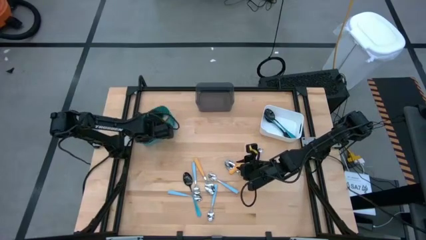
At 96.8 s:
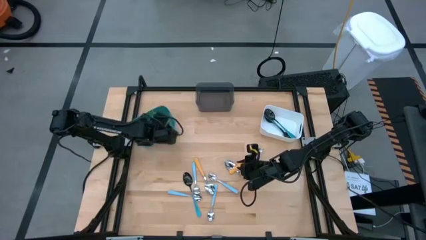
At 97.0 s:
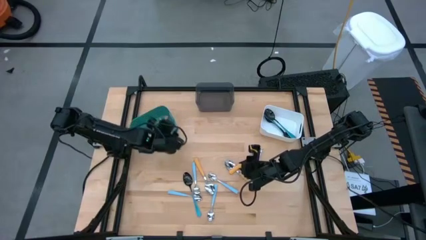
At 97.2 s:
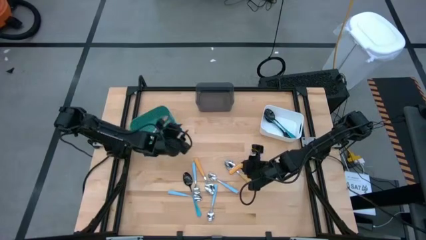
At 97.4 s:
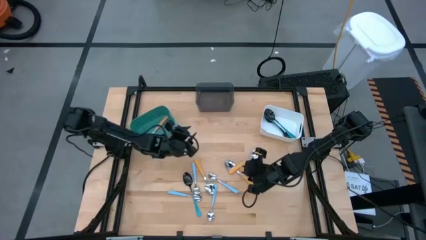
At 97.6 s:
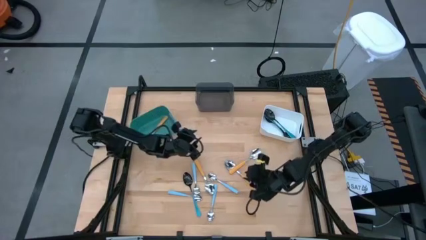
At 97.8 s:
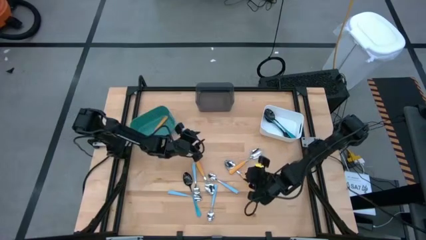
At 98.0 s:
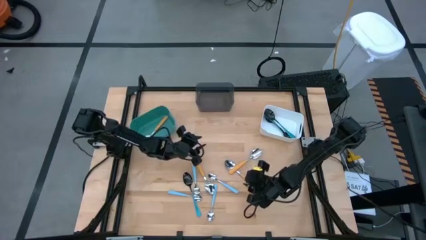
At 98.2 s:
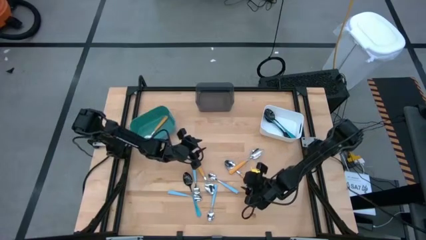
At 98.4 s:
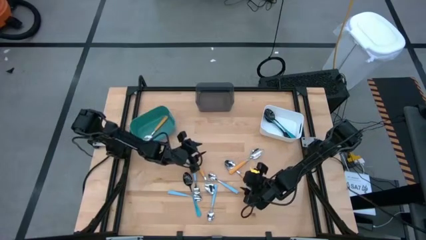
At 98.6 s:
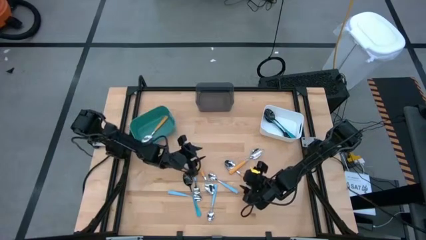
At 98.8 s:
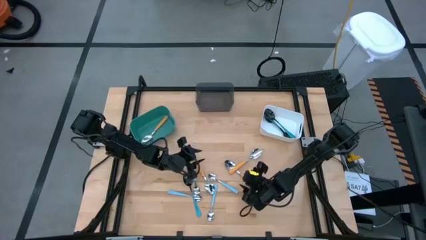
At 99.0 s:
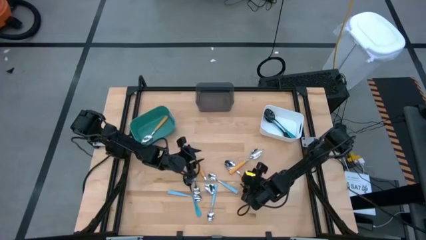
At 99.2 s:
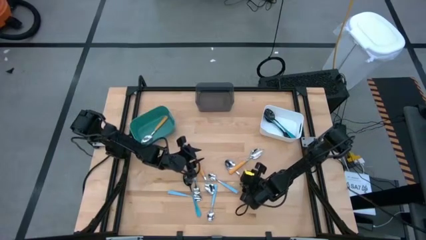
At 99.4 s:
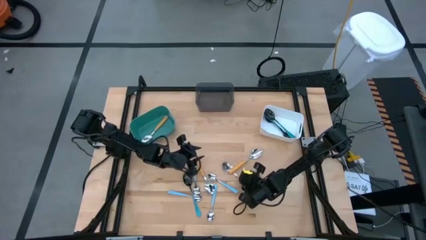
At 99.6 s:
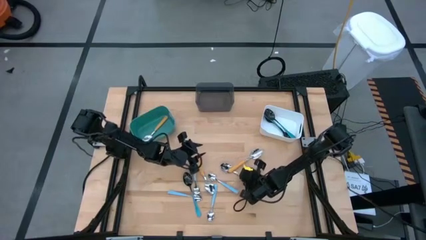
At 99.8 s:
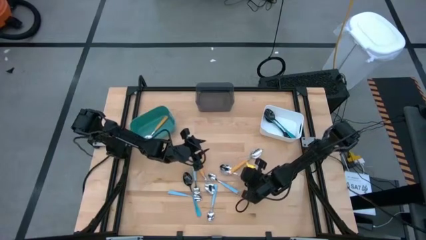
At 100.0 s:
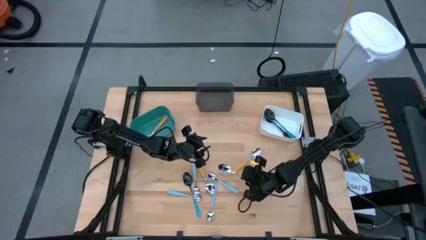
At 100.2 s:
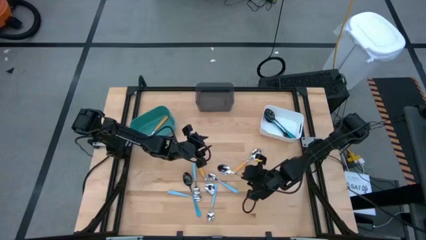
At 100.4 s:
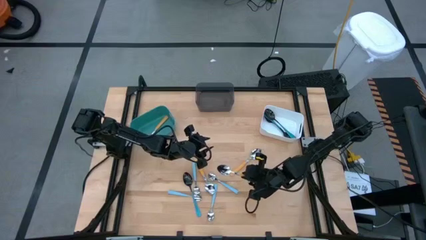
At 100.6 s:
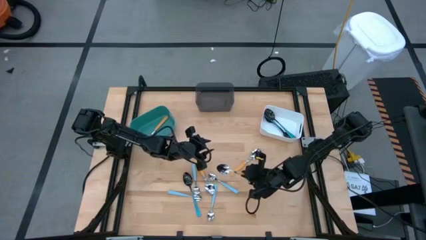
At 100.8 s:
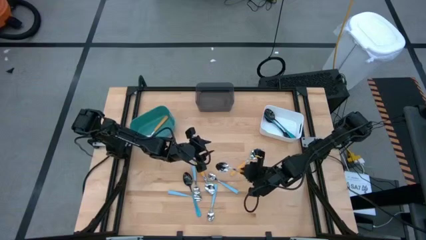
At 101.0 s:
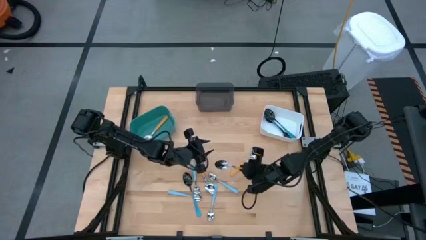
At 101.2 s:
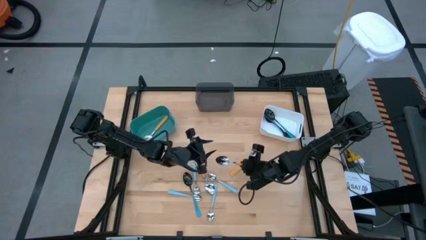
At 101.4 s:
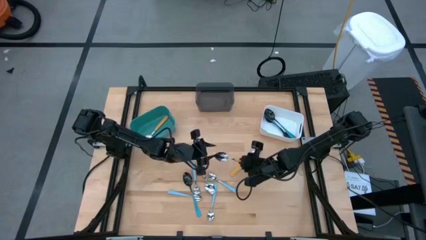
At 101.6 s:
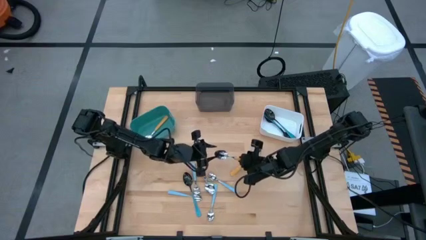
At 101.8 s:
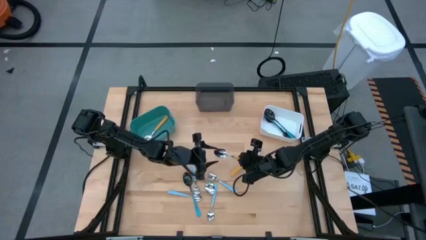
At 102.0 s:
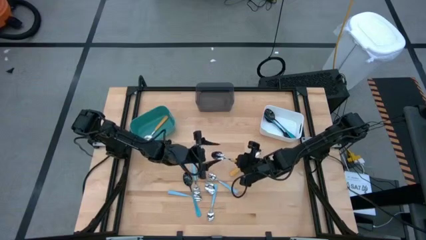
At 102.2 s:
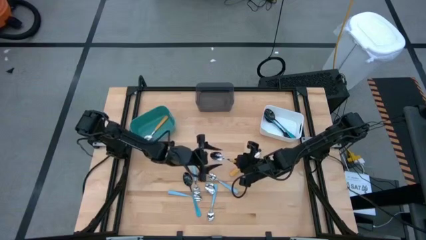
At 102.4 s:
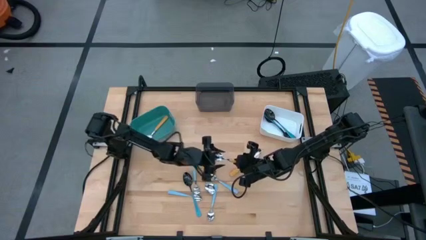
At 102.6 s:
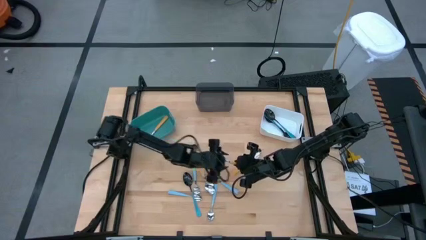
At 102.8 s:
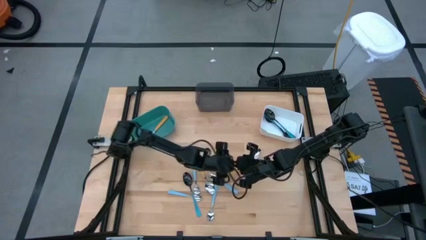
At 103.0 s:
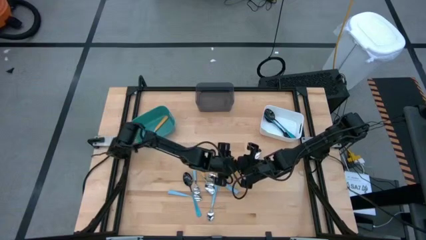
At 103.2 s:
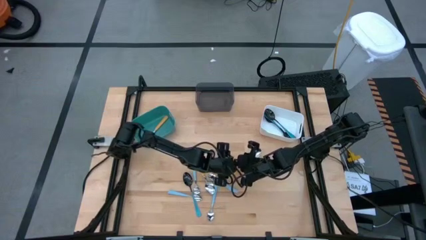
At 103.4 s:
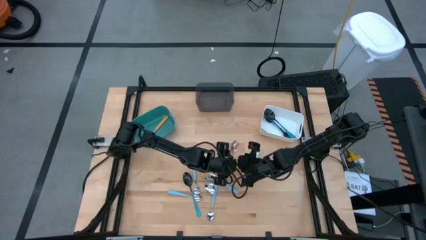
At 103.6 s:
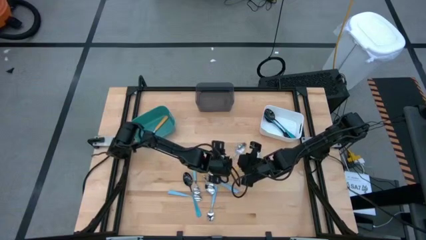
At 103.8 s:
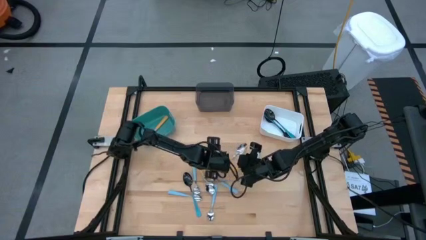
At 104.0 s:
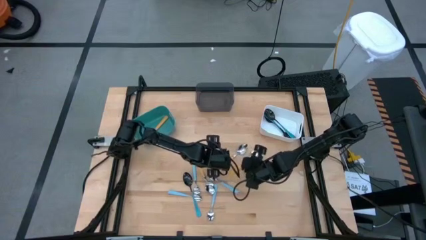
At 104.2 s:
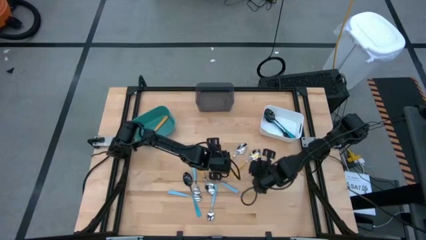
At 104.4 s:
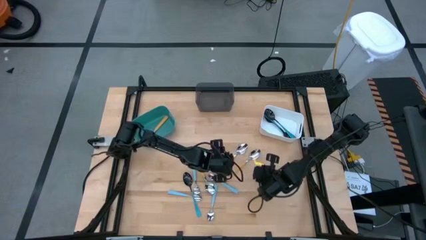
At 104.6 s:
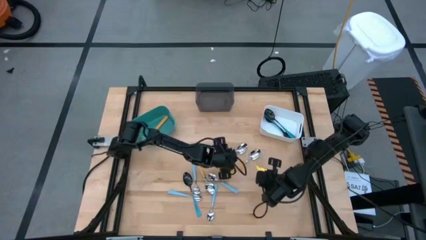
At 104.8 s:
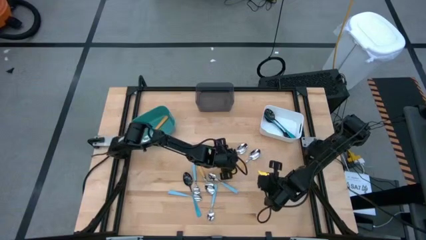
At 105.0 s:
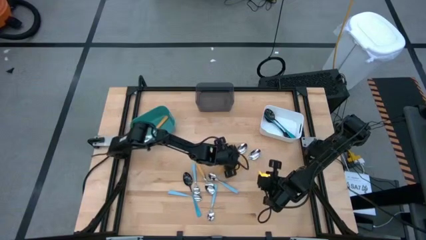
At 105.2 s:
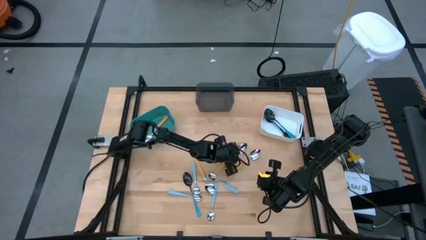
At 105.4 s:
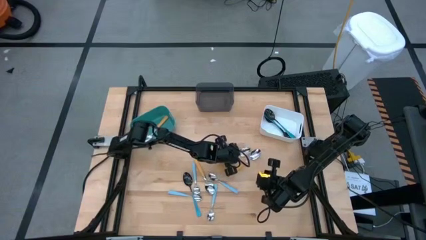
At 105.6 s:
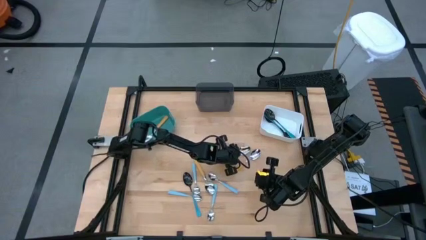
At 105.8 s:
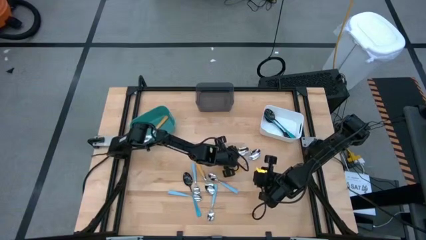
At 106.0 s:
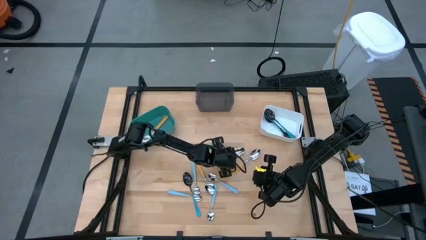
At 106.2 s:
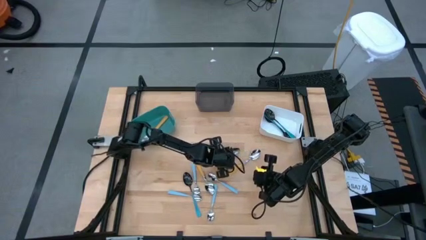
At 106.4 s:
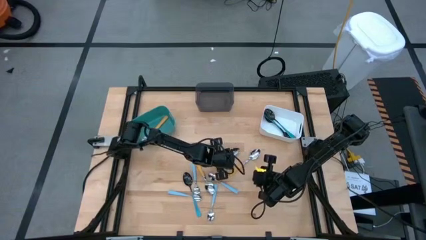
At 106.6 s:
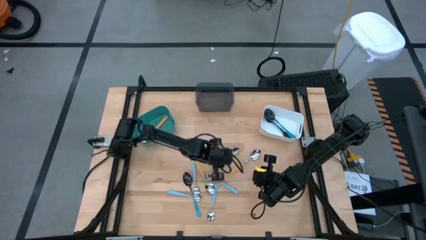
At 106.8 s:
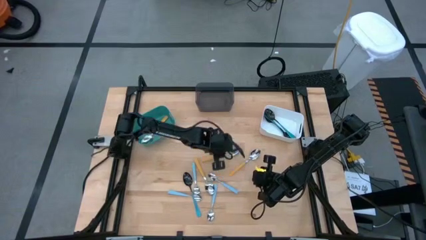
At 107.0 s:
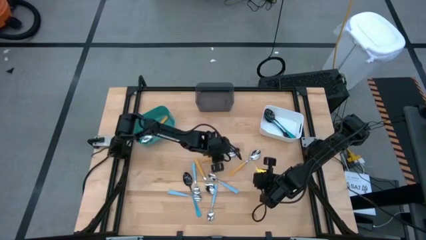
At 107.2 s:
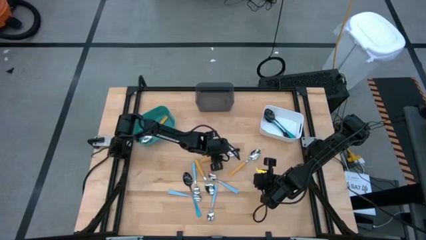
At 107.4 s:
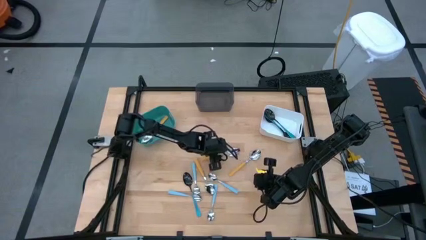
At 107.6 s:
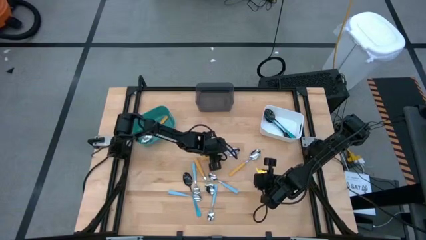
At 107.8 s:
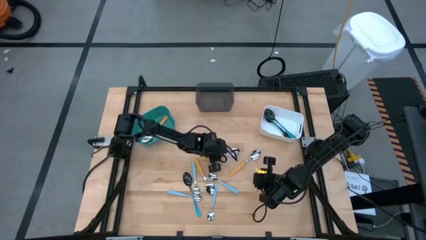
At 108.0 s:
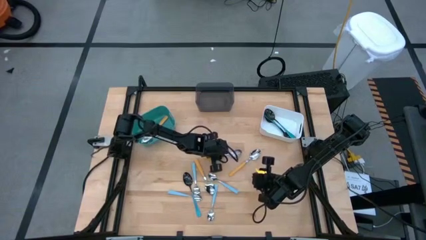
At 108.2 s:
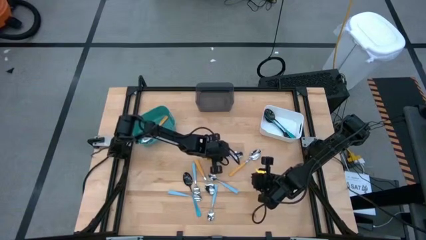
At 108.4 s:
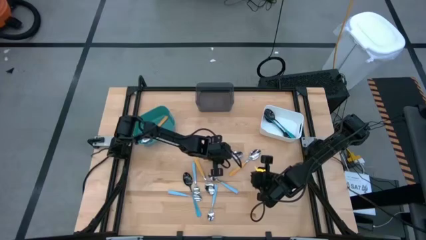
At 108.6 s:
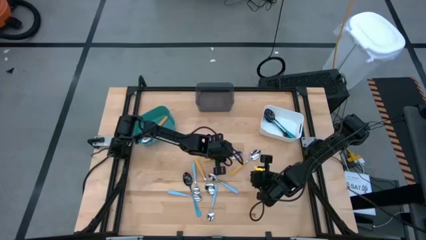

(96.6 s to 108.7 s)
Task: Sort silverware by color (type)
Put the yellow spoon into the green bin
